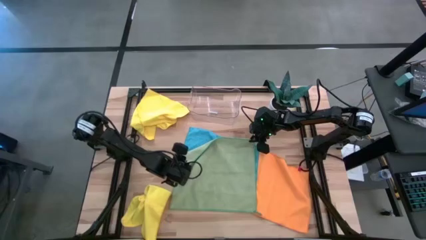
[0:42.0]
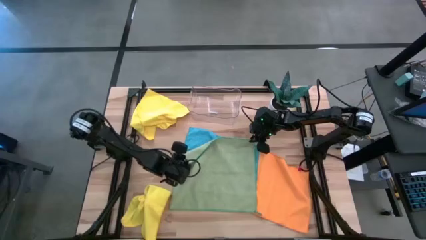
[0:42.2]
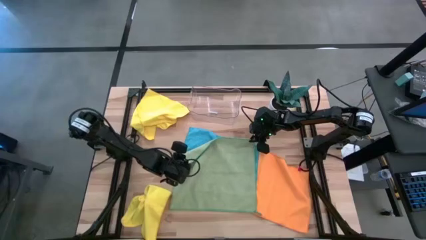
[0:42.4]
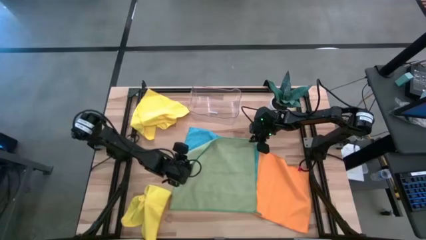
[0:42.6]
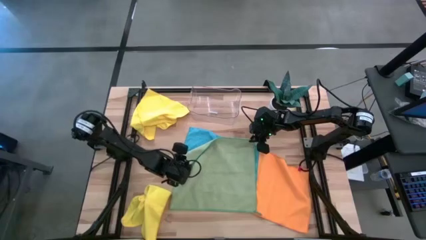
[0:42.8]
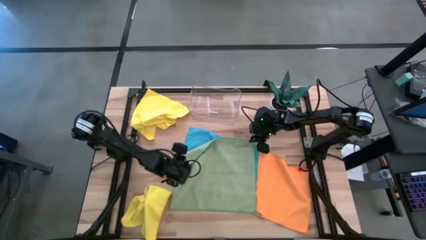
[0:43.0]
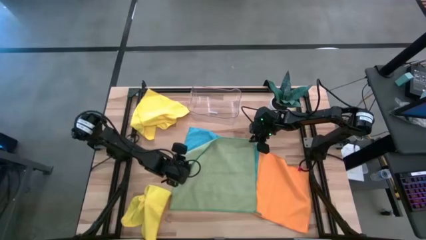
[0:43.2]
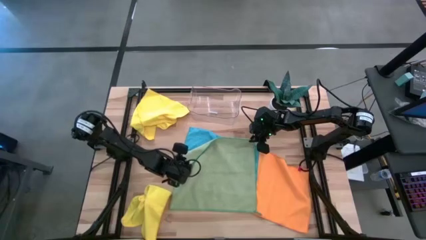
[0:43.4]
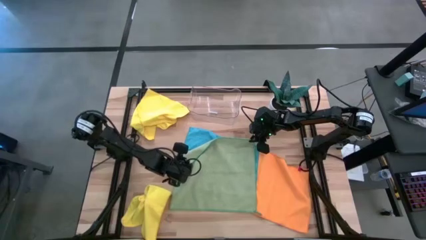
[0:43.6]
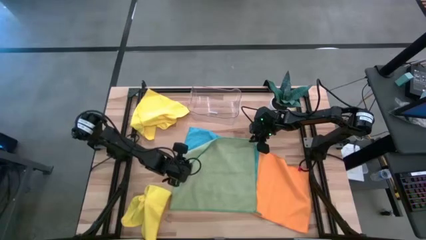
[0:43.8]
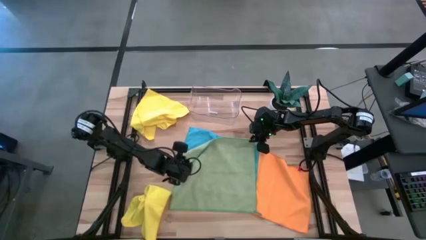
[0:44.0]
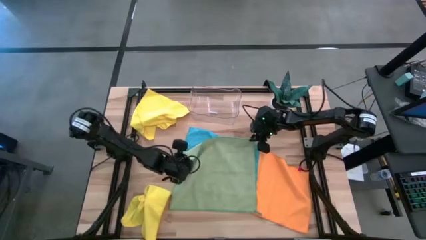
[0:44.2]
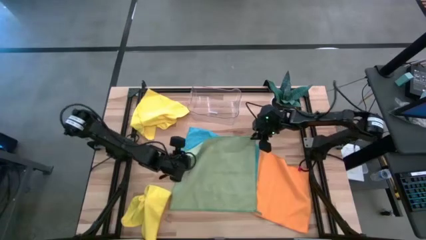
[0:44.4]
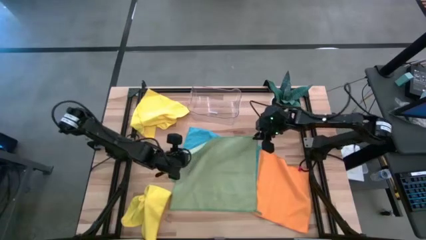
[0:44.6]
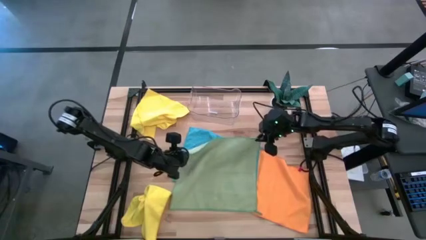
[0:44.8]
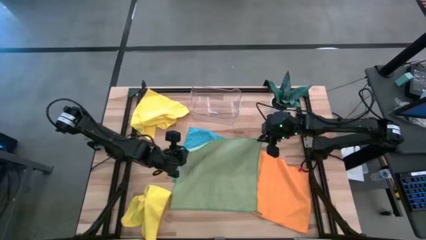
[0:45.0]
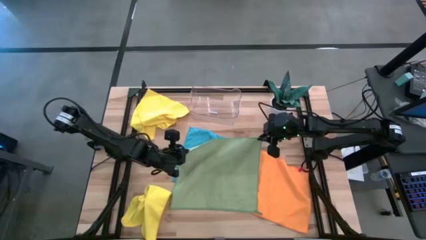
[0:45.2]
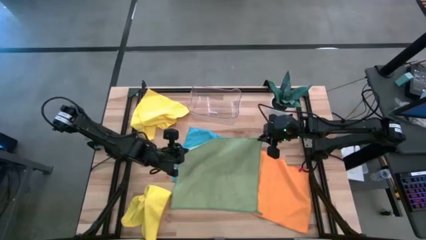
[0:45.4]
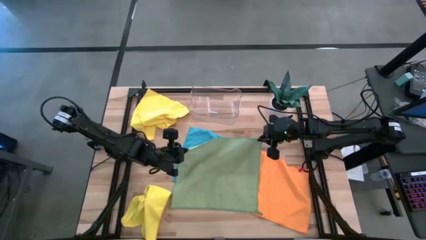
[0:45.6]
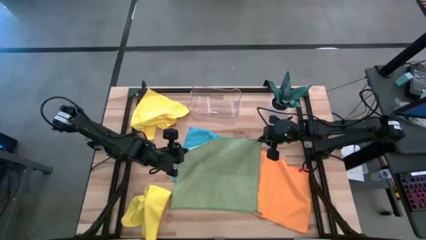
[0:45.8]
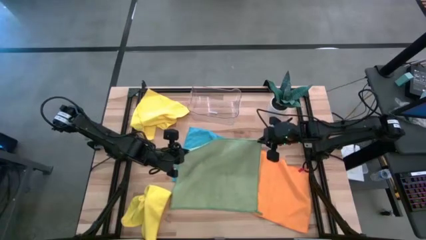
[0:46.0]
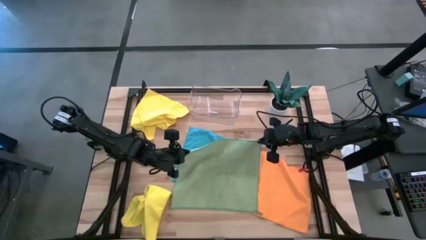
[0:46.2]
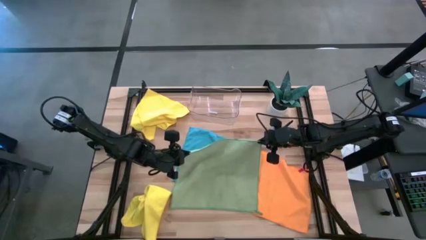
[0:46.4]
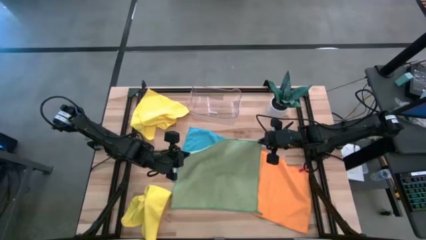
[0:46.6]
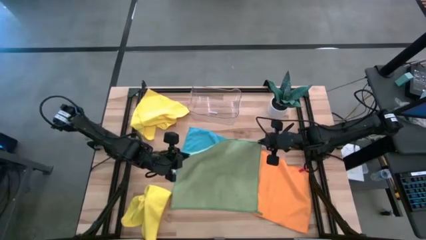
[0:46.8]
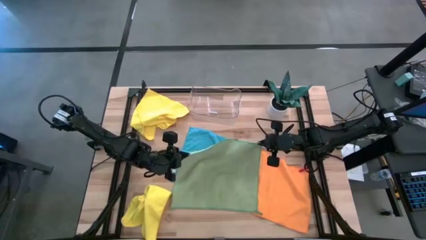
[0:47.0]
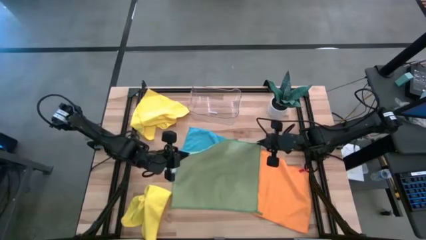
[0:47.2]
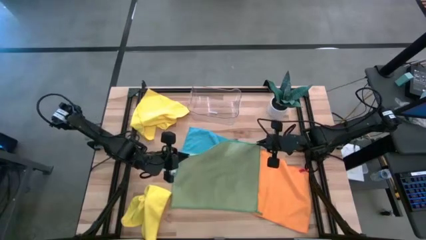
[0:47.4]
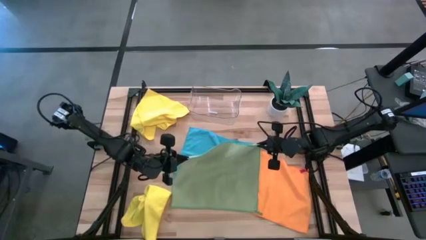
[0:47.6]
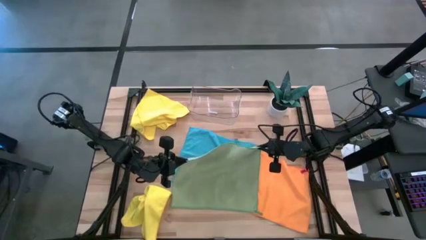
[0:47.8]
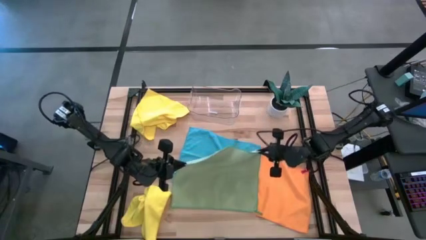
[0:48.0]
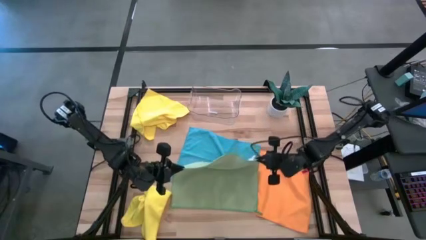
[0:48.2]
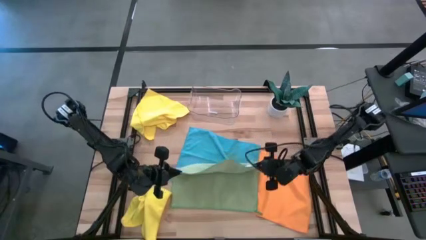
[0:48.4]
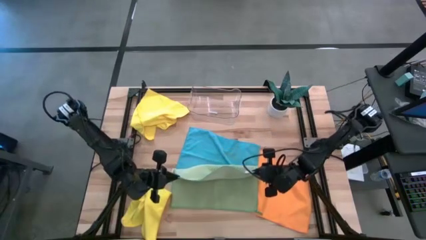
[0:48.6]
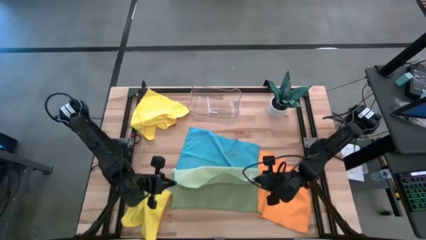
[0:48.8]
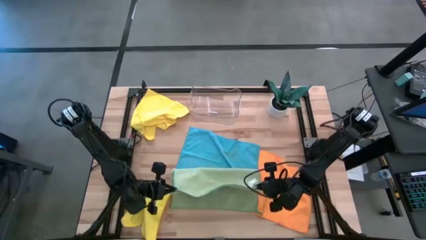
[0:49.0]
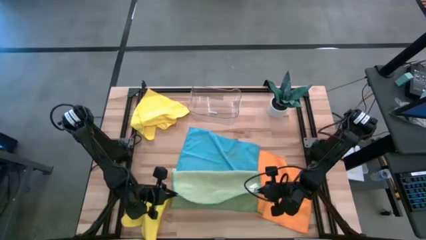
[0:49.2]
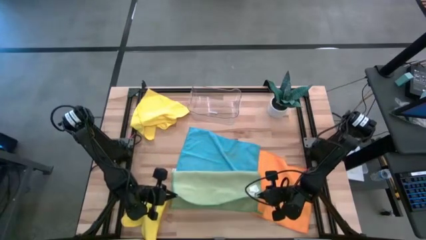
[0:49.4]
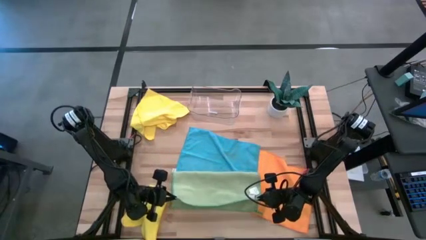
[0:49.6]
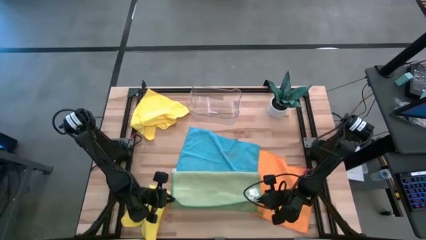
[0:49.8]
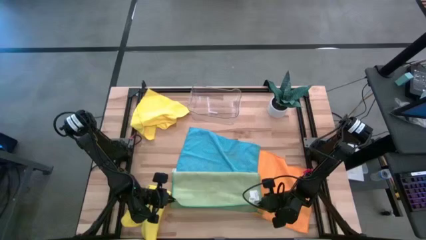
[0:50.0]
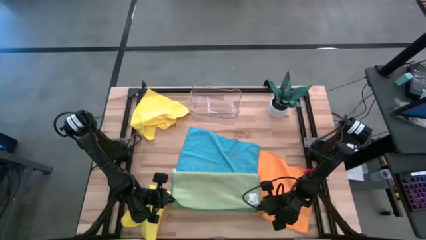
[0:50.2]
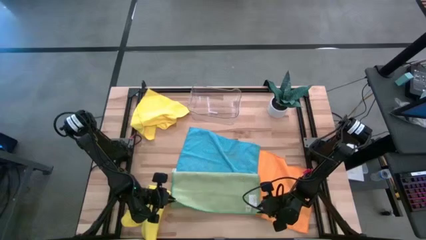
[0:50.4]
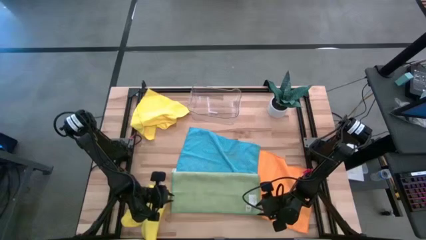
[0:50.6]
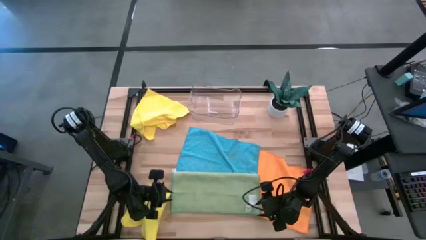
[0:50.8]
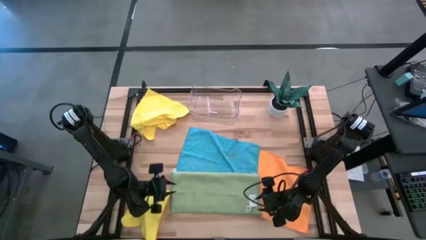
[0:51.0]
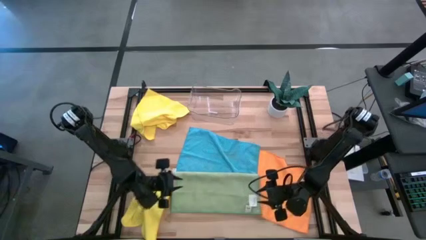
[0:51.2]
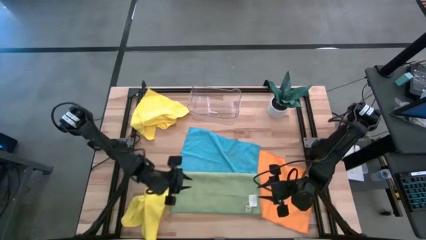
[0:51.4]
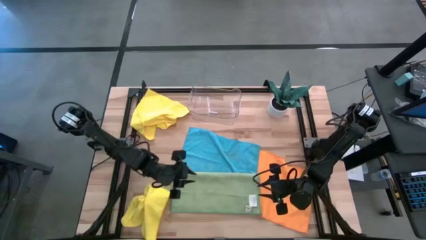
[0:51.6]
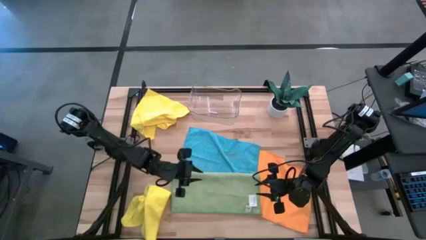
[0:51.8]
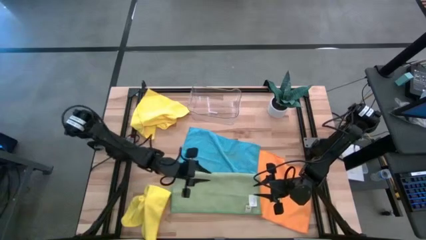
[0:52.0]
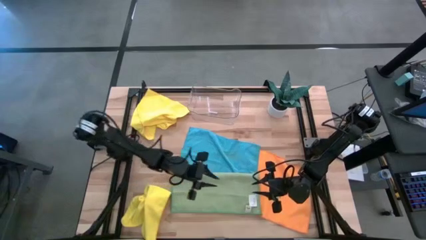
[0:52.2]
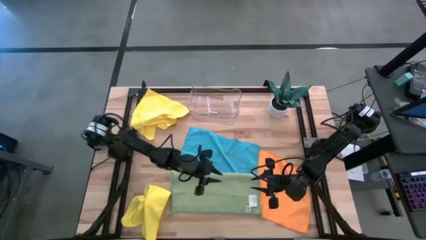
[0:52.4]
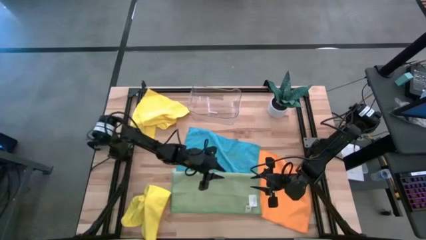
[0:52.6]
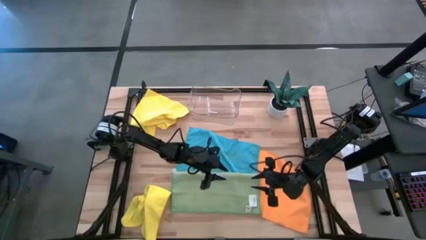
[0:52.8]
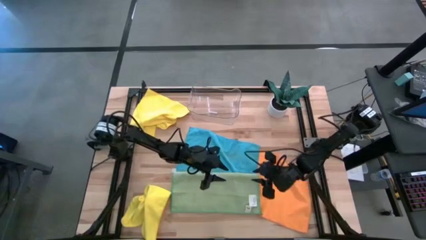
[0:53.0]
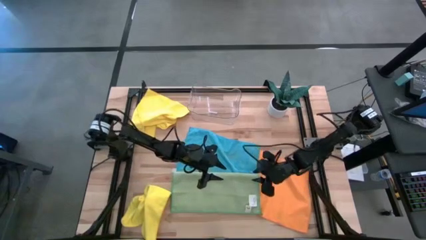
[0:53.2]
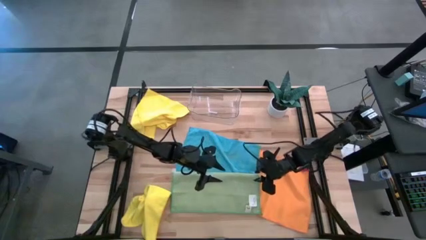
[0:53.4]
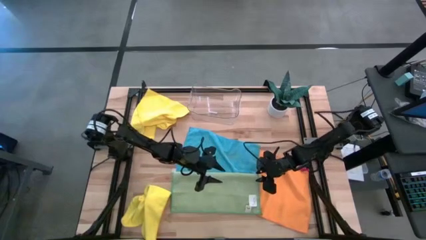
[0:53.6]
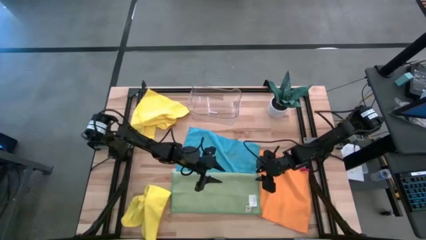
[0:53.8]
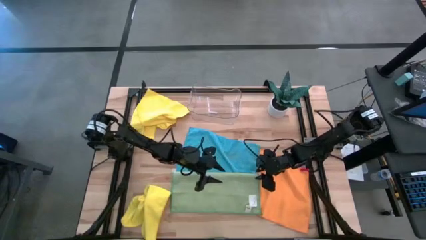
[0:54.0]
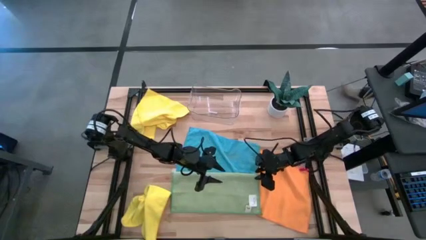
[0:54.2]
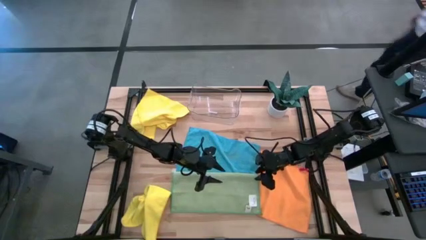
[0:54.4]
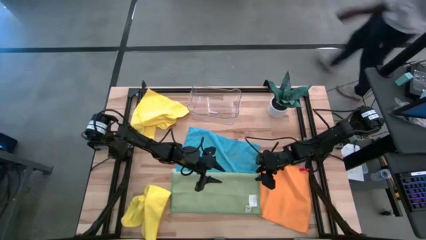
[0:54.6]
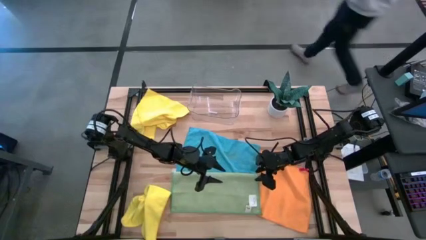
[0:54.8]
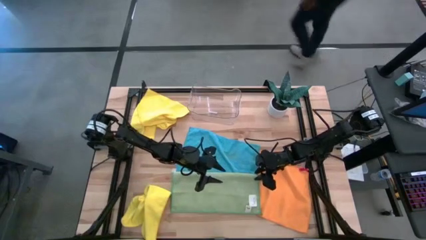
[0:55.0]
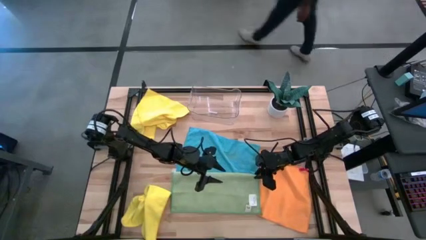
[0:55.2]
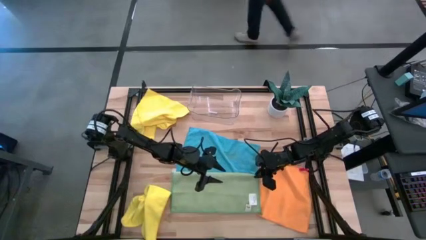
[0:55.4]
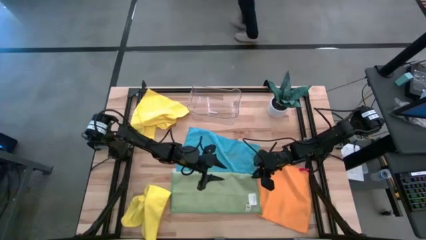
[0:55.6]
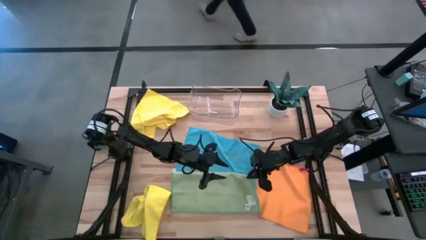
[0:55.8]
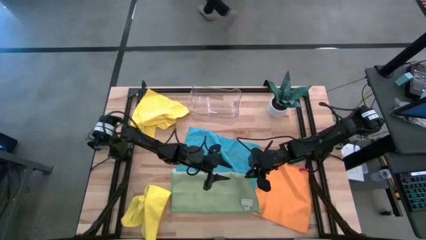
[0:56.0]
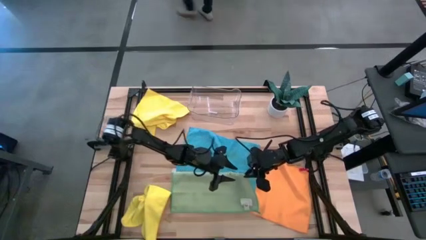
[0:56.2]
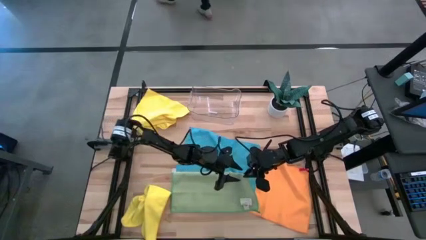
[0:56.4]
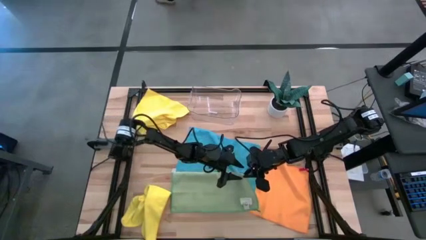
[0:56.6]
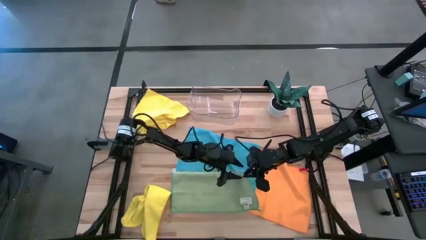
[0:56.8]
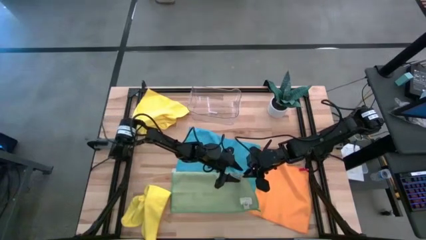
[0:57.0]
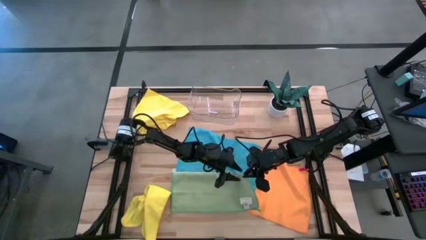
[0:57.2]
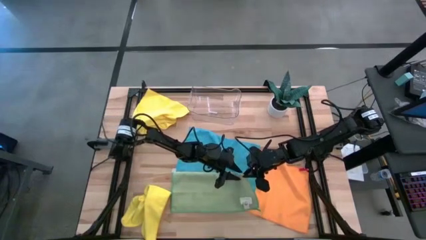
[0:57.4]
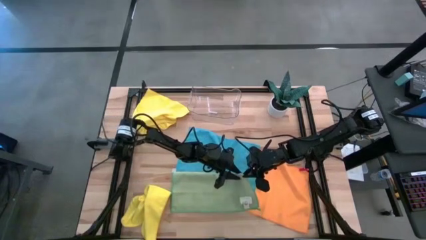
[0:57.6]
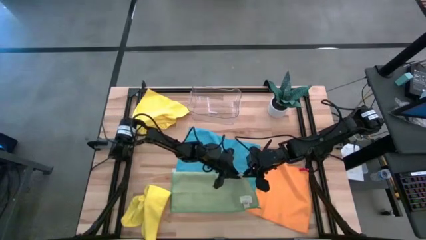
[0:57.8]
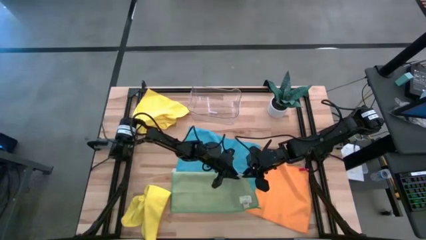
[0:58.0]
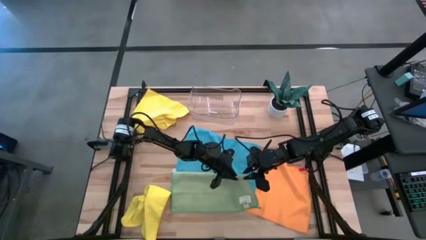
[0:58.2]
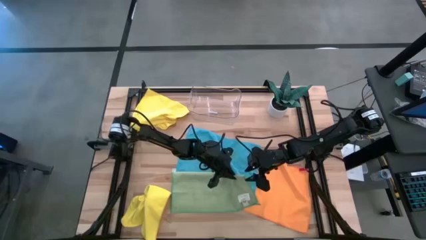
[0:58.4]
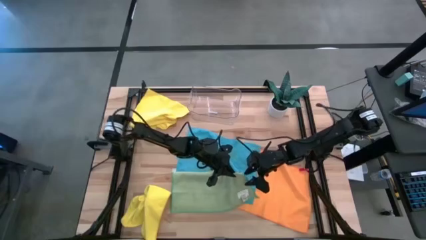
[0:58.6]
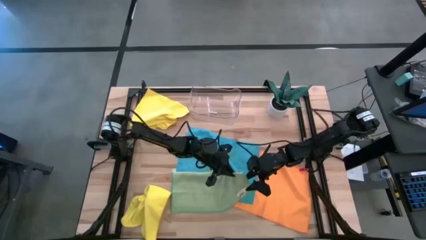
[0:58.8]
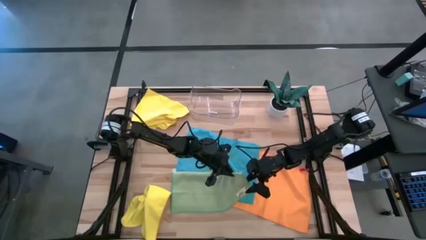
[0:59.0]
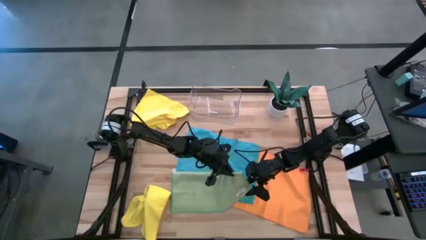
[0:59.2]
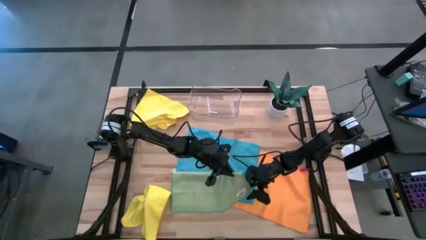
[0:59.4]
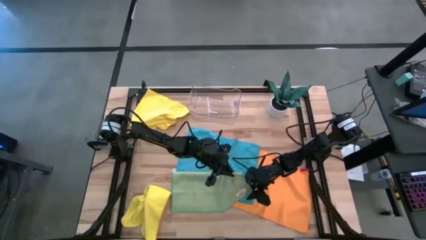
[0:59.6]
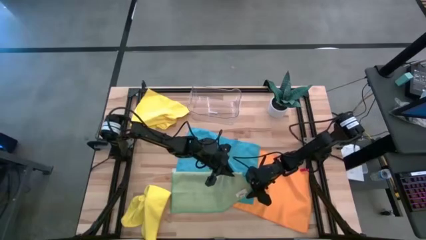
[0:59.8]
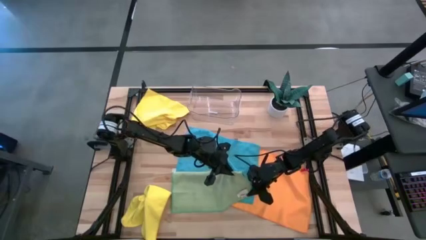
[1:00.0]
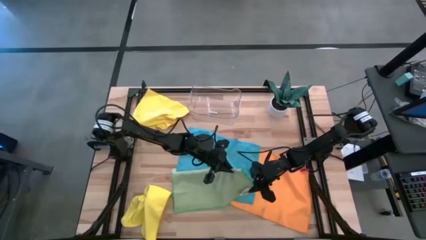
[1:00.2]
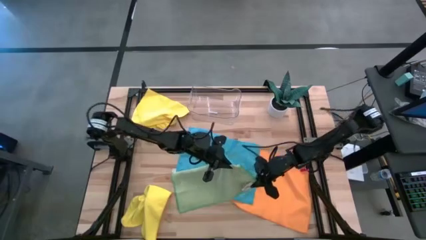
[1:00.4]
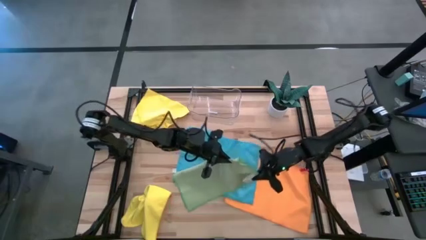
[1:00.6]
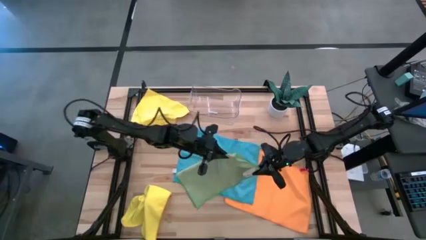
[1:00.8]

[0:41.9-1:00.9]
Task: Fold microfiber towels
Fold the green towel
